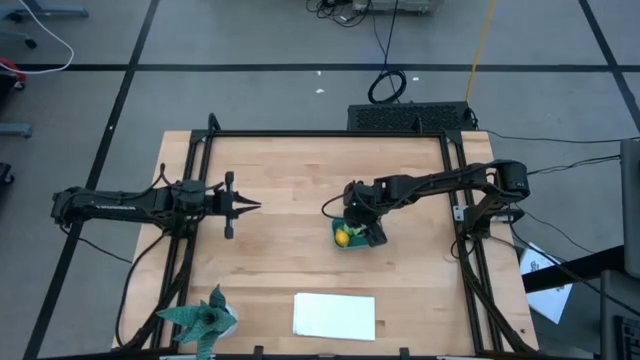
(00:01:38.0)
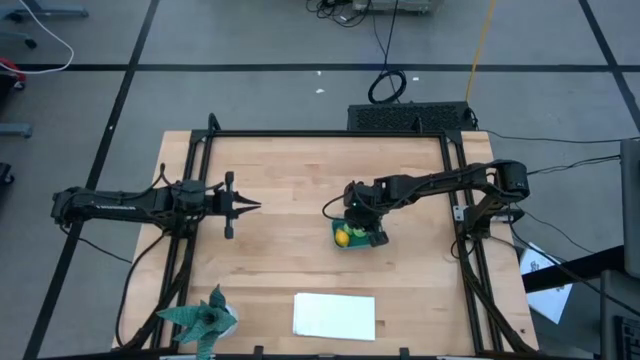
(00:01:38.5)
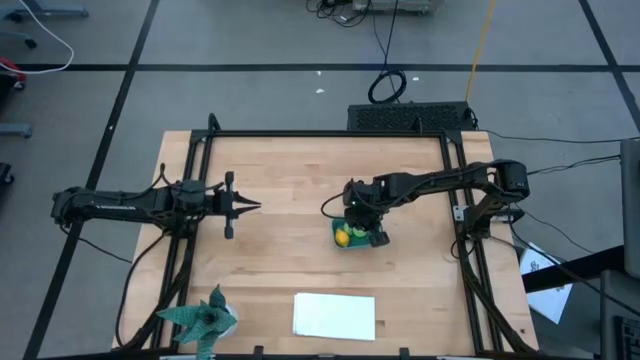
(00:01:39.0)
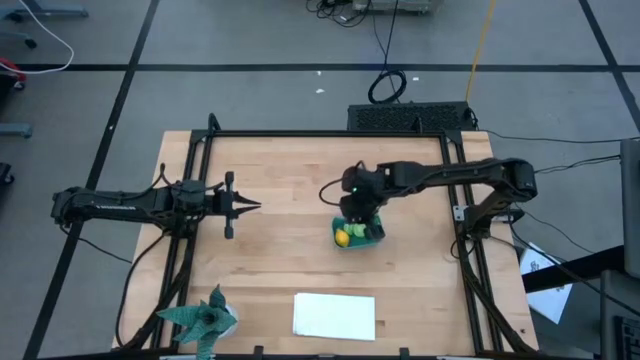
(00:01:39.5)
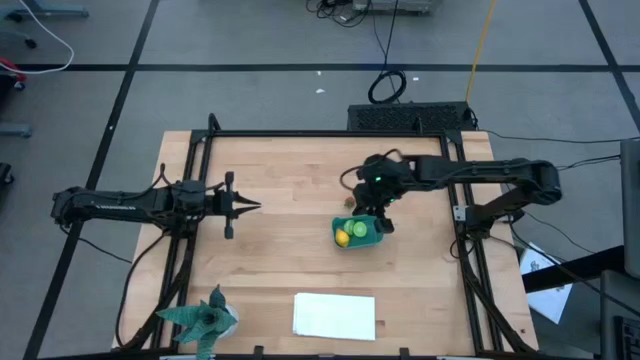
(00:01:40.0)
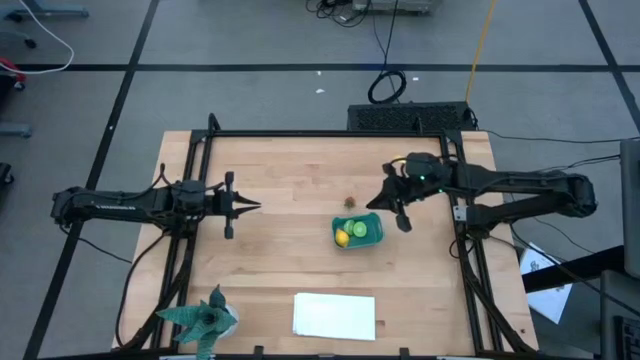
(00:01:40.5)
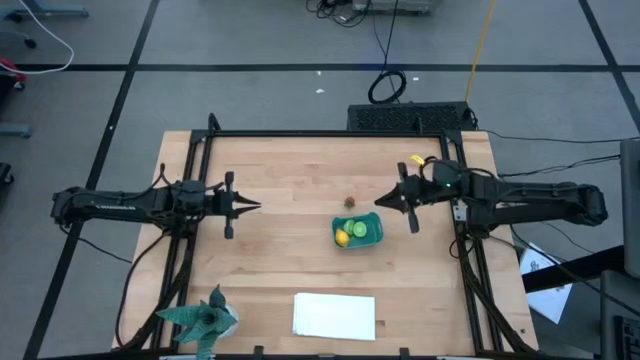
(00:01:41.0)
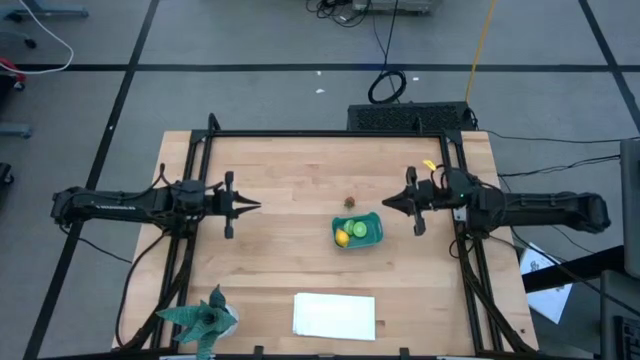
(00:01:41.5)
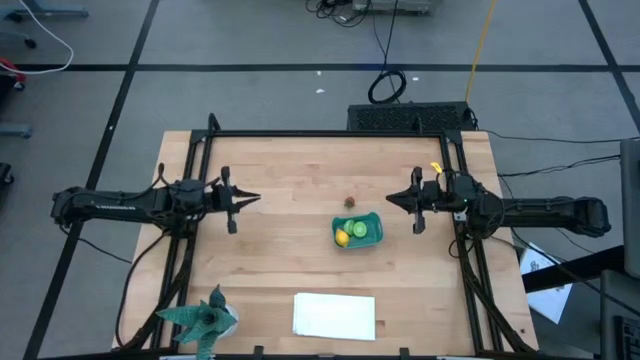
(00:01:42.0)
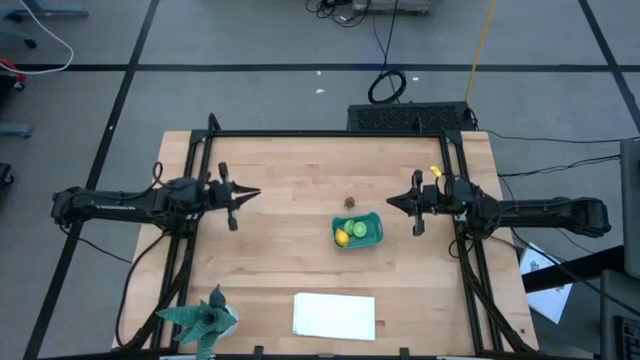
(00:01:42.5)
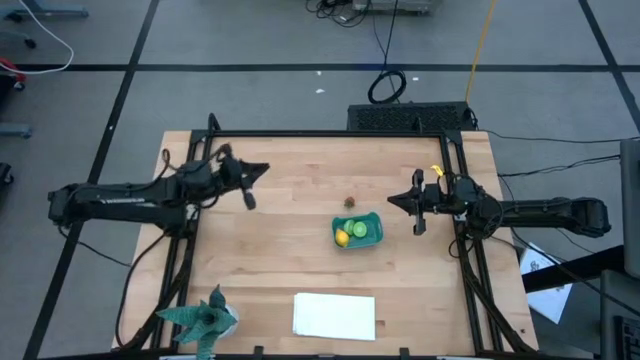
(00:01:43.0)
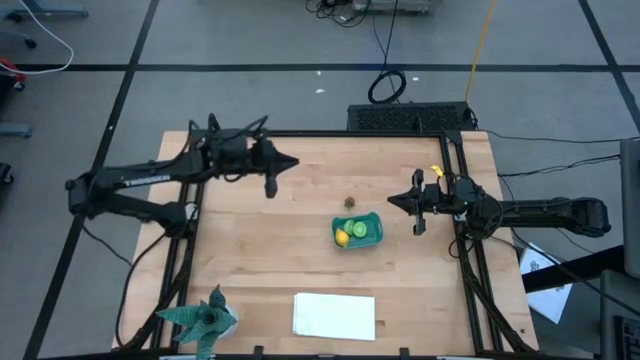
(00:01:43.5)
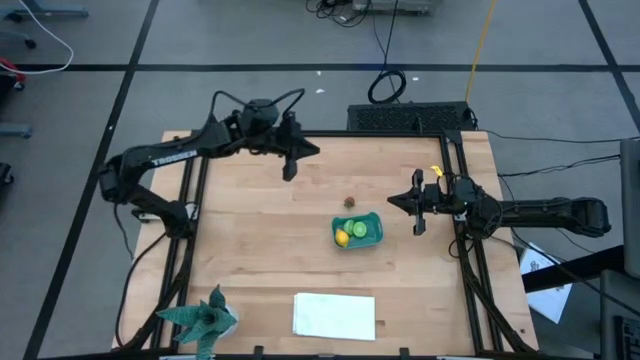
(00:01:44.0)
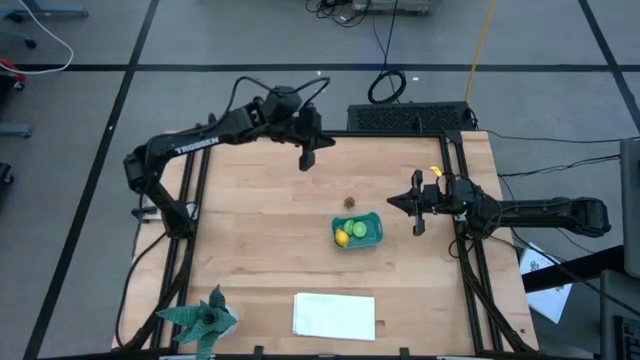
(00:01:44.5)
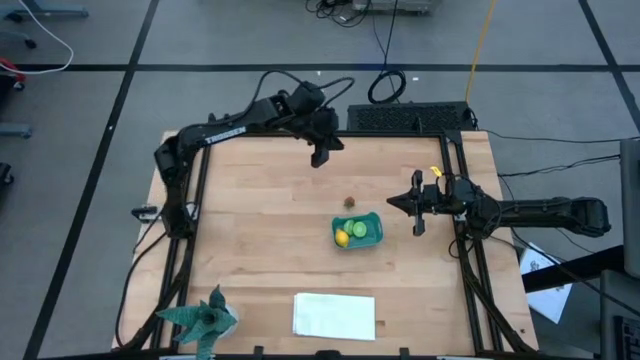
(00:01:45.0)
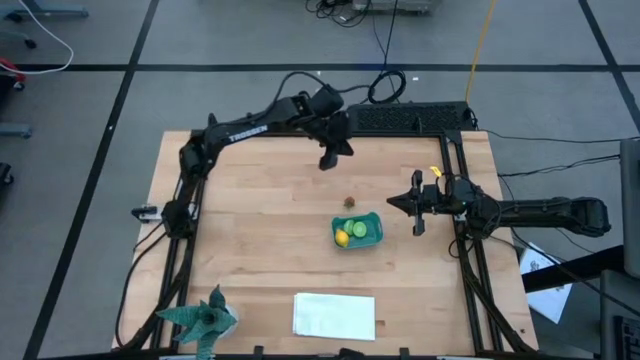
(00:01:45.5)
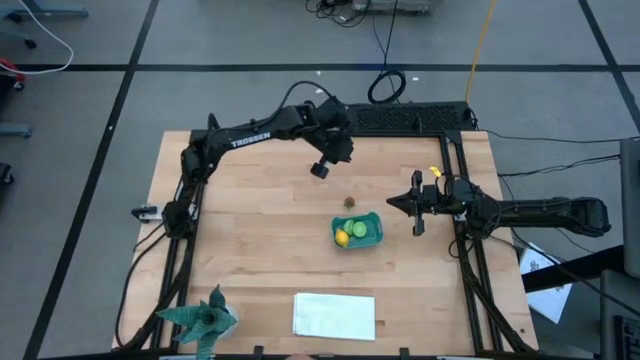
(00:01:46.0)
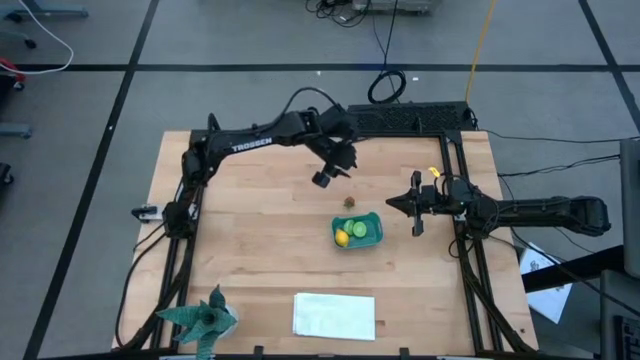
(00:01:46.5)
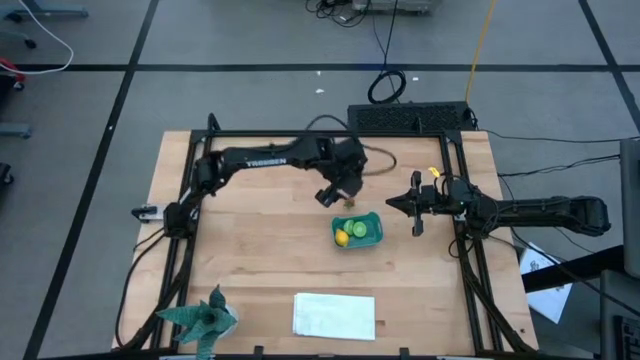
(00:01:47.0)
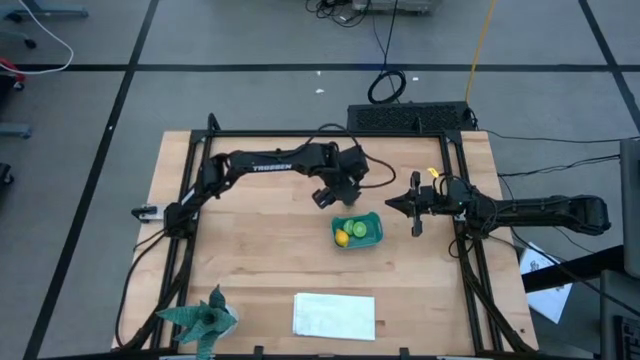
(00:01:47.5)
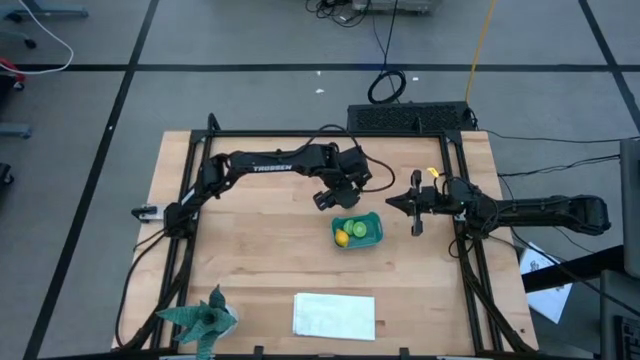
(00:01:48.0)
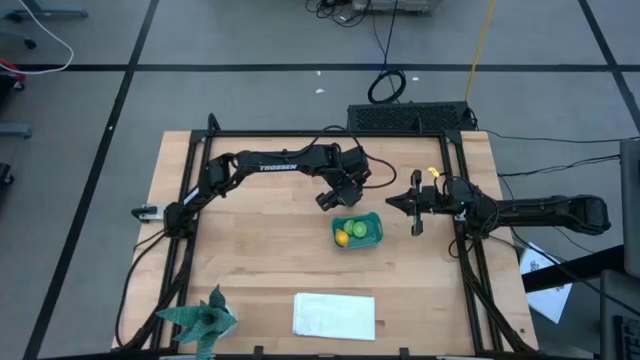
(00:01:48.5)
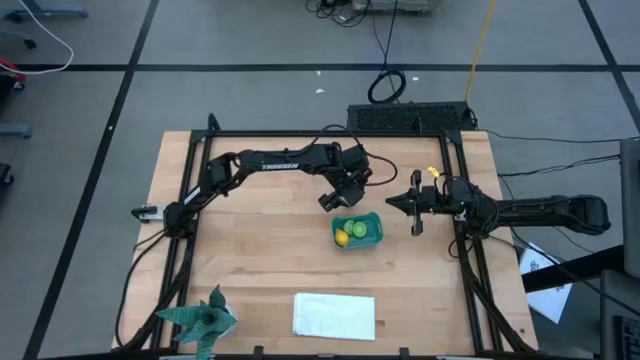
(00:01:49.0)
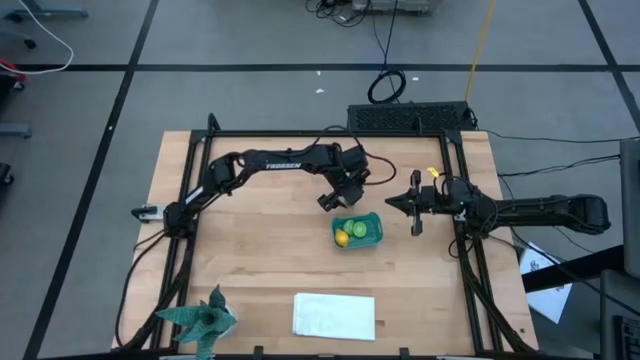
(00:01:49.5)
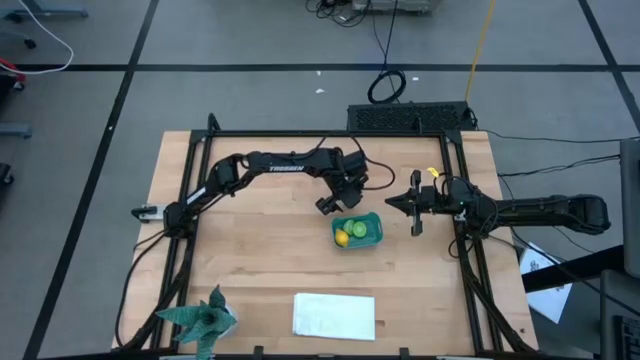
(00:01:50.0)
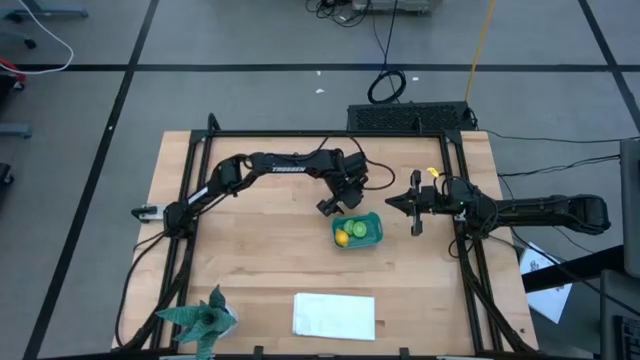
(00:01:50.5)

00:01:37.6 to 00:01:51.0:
Task: Pick and placing Produce into tupperware
Put the red strawberry into the green bin

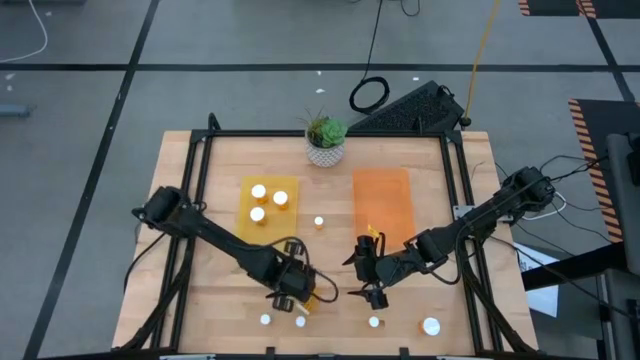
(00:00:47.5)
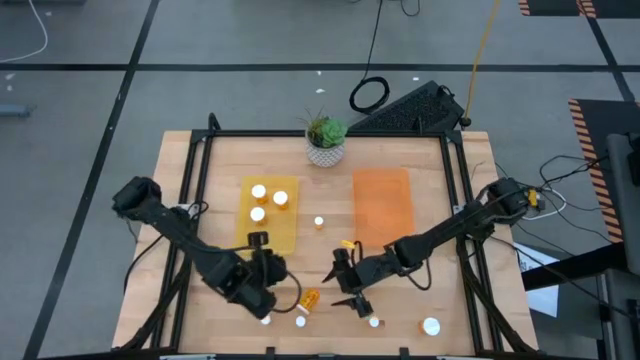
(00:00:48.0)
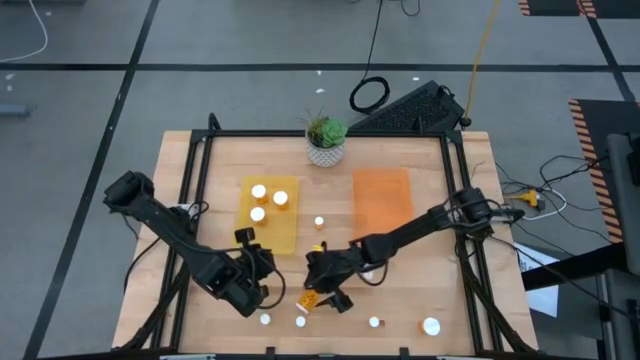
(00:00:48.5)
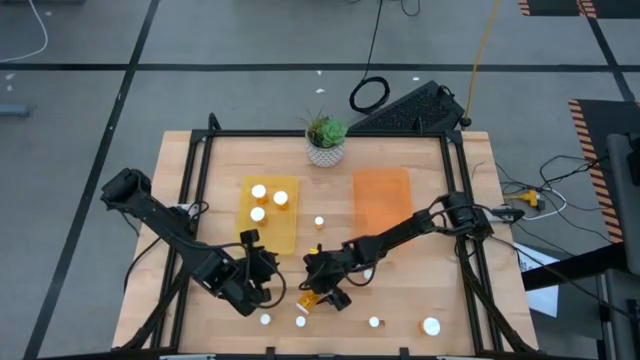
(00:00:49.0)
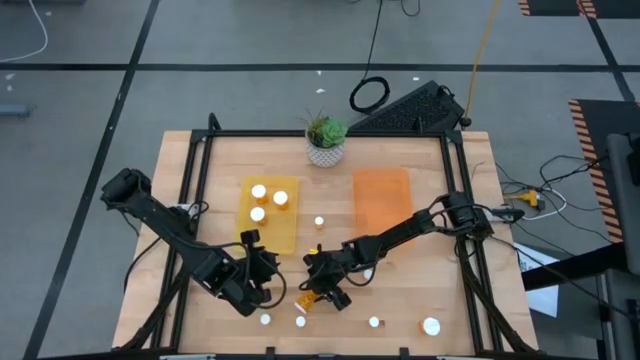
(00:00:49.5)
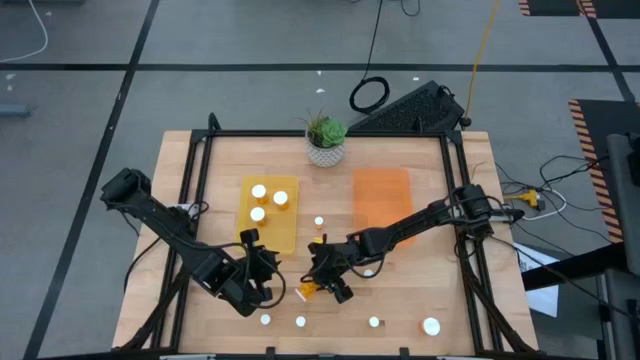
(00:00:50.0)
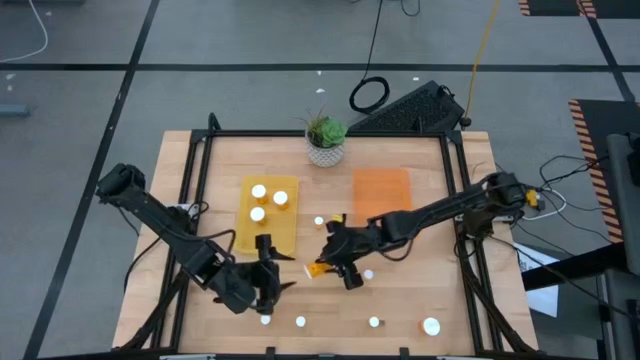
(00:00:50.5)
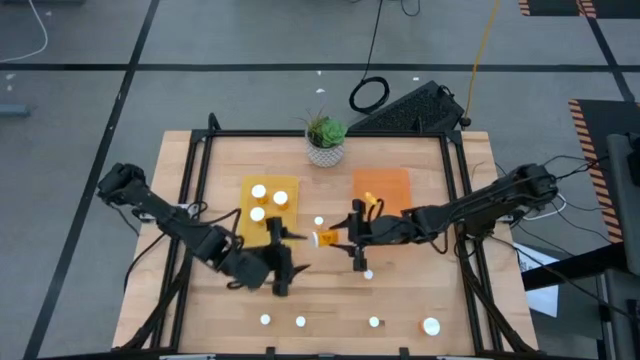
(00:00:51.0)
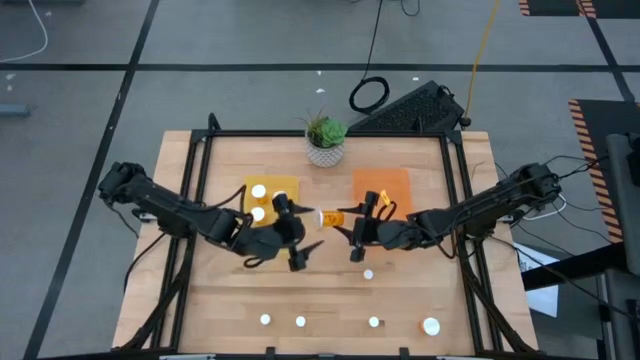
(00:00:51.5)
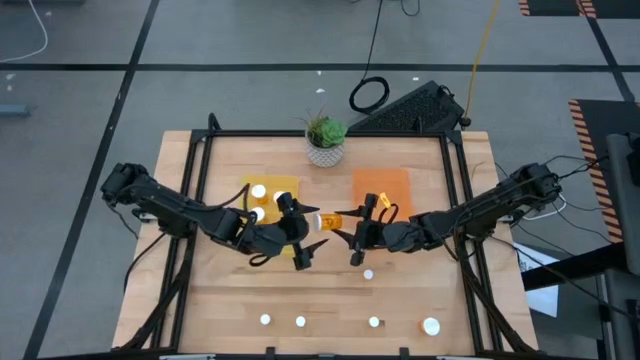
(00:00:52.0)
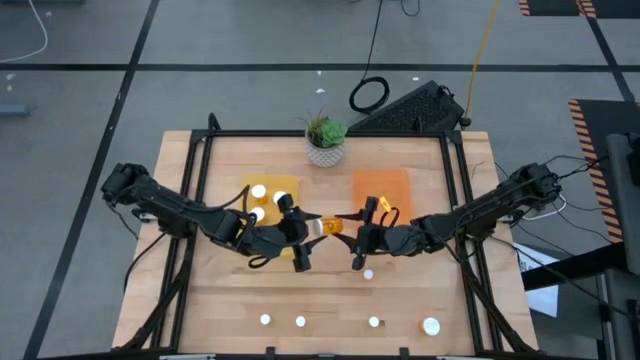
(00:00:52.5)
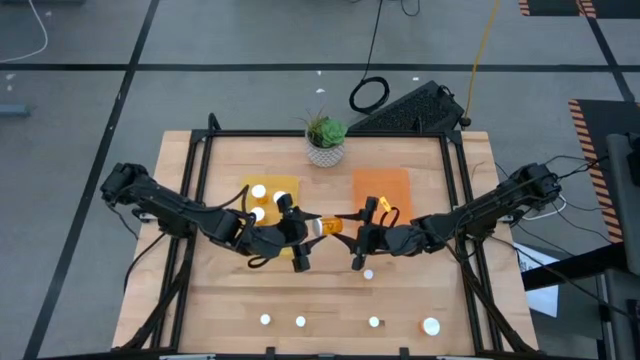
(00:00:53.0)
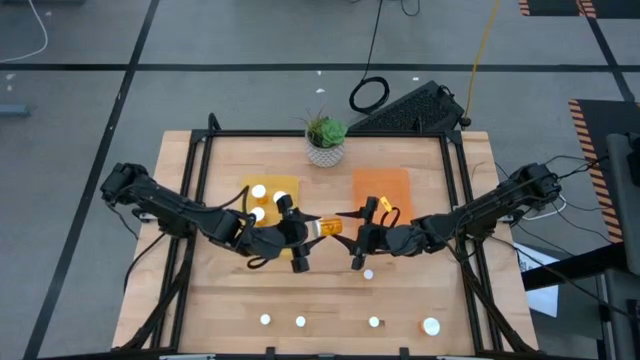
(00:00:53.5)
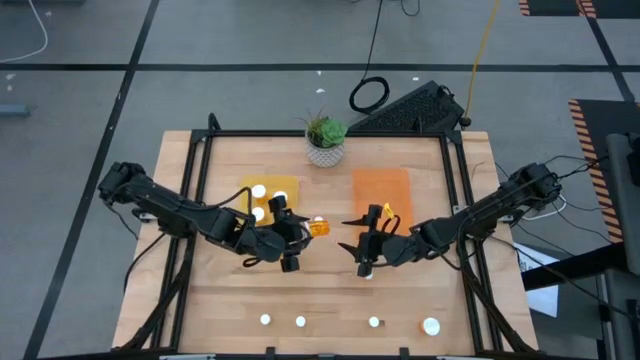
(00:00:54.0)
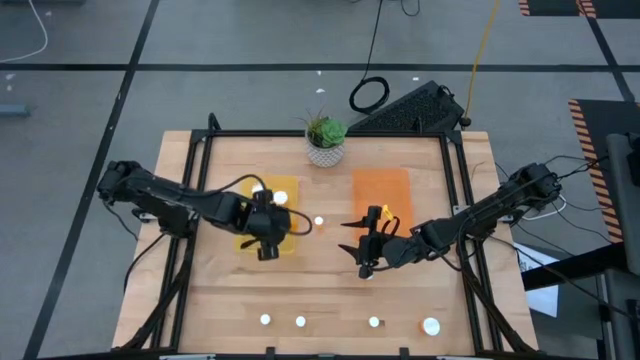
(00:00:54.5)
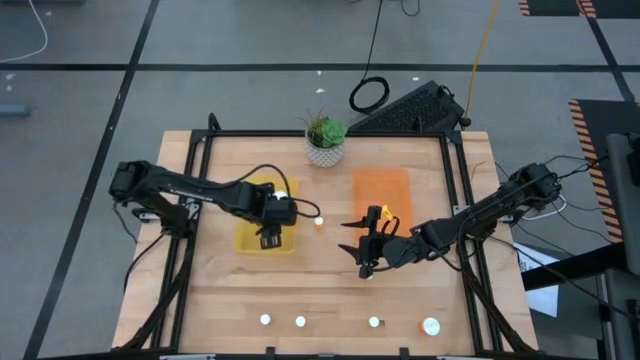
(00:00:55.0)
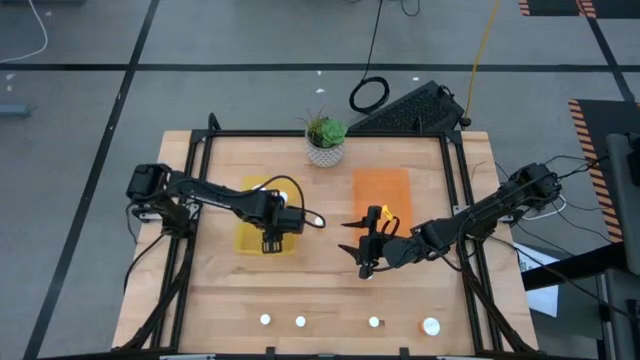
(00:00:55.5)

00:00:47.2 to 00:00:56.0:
Task: Pick and place medicine bottles into bin by pill shape (circle, oval)
Put the large medicine bottle into the yellow bin
